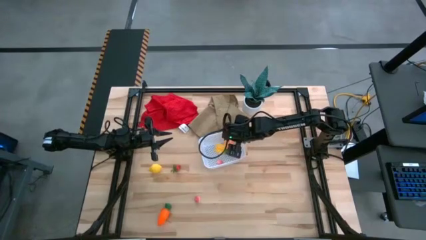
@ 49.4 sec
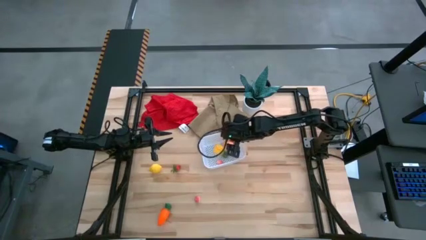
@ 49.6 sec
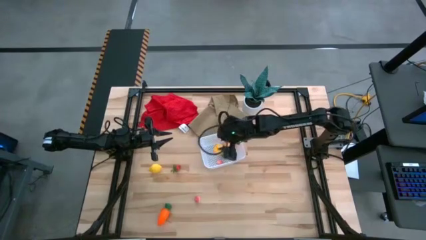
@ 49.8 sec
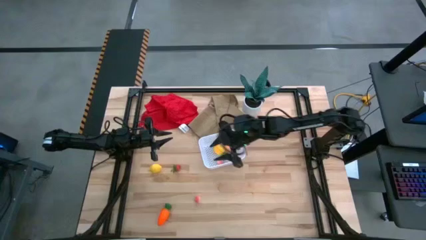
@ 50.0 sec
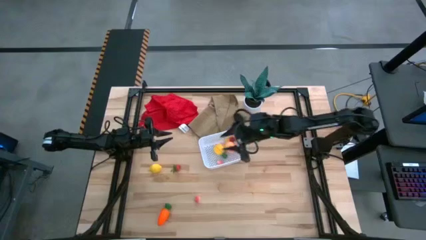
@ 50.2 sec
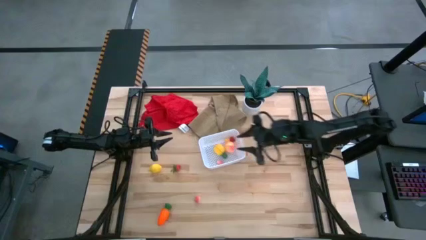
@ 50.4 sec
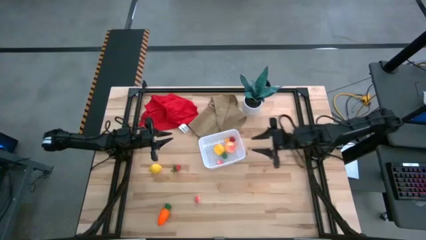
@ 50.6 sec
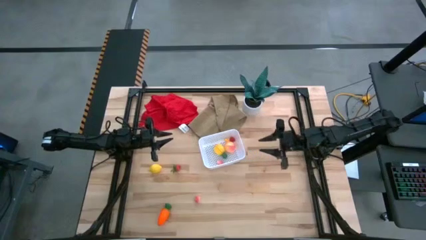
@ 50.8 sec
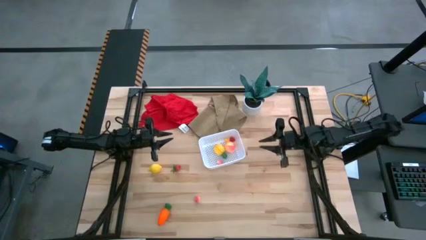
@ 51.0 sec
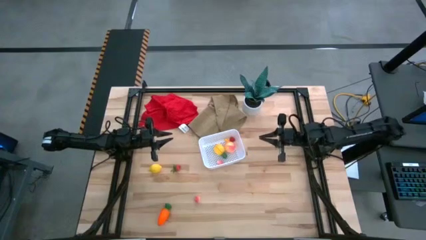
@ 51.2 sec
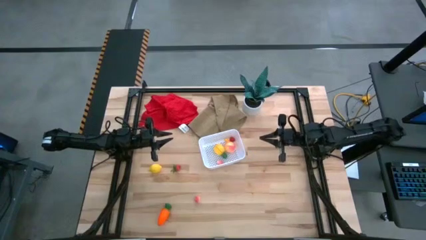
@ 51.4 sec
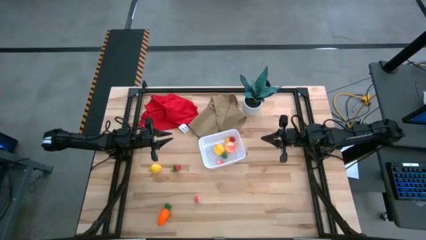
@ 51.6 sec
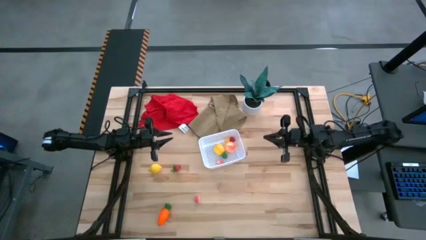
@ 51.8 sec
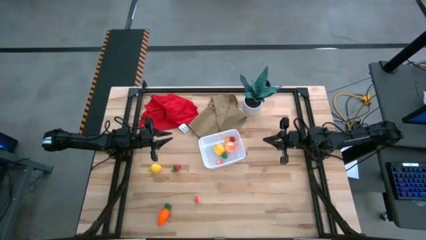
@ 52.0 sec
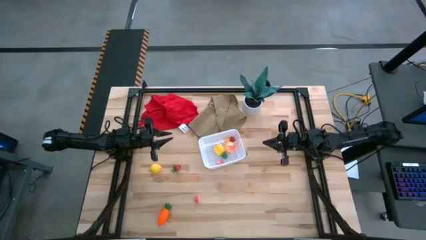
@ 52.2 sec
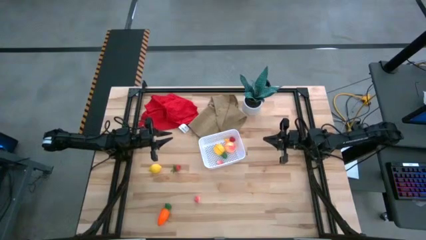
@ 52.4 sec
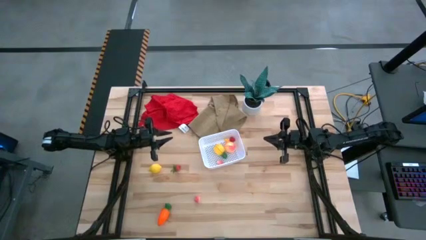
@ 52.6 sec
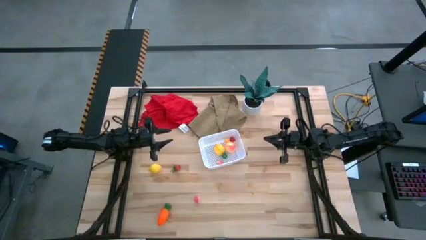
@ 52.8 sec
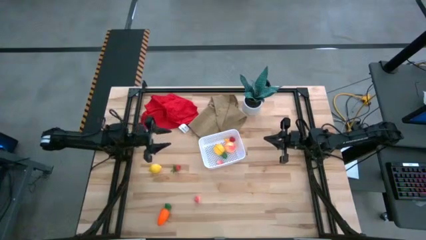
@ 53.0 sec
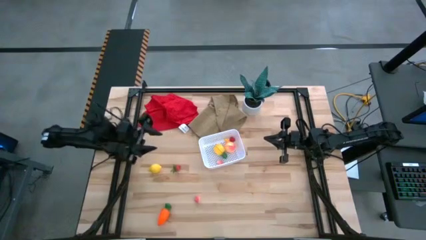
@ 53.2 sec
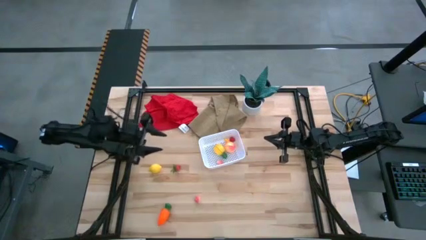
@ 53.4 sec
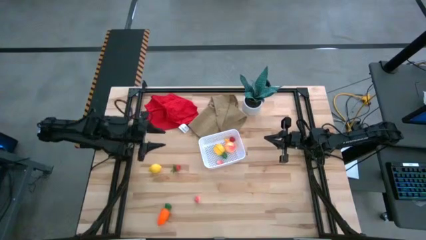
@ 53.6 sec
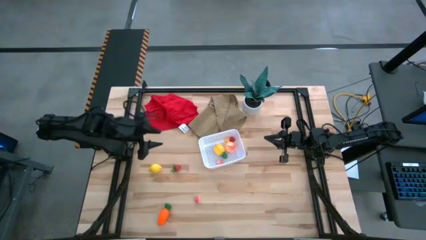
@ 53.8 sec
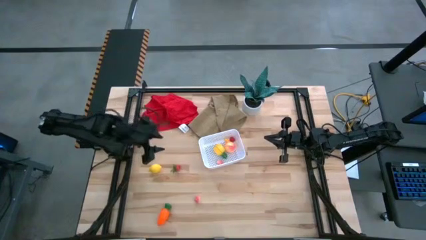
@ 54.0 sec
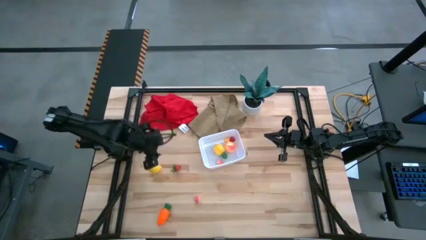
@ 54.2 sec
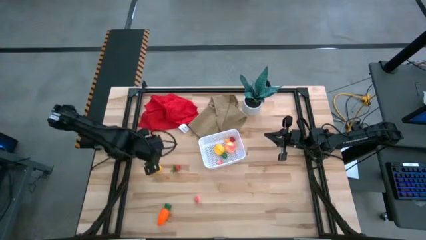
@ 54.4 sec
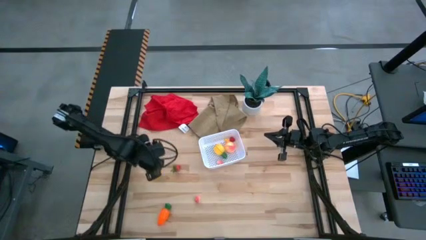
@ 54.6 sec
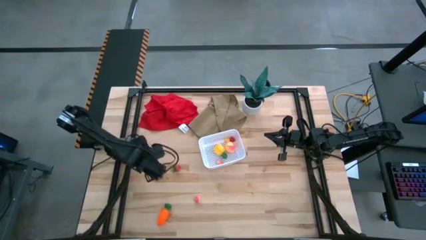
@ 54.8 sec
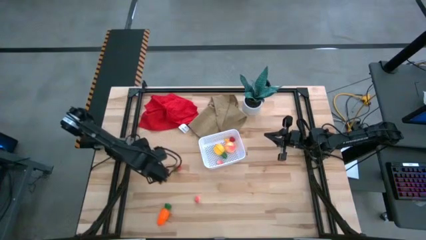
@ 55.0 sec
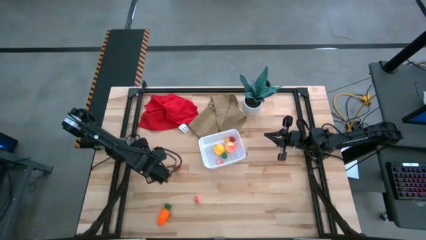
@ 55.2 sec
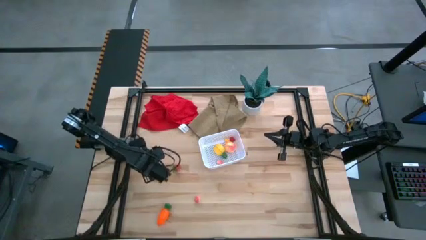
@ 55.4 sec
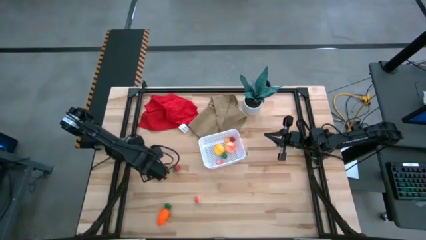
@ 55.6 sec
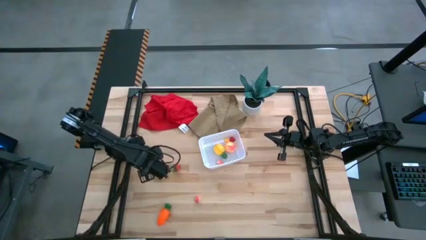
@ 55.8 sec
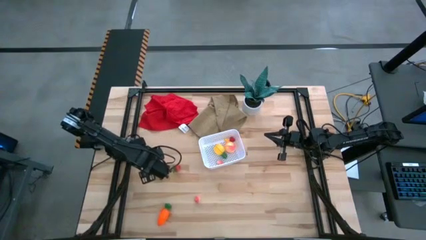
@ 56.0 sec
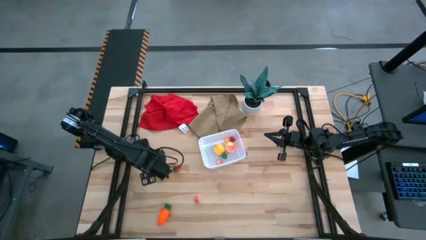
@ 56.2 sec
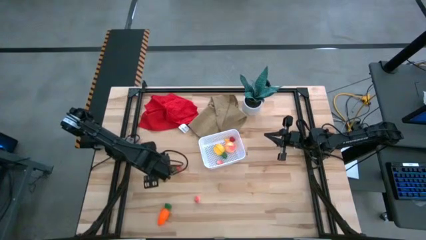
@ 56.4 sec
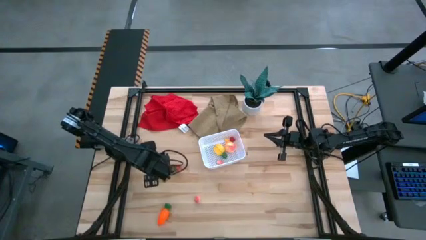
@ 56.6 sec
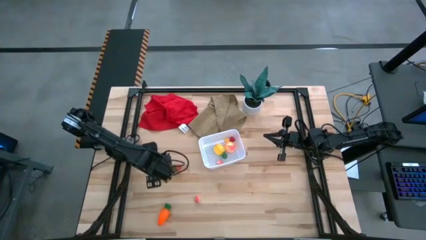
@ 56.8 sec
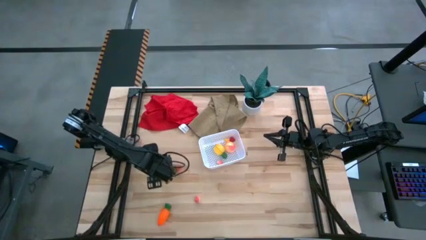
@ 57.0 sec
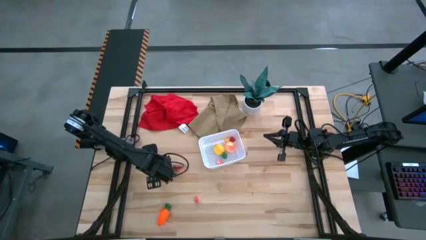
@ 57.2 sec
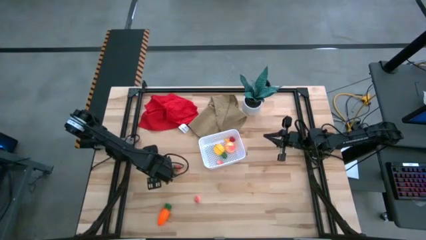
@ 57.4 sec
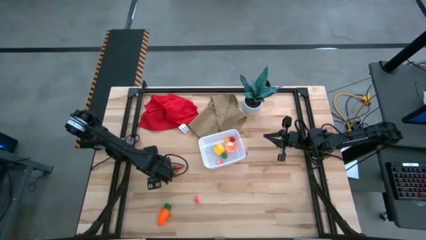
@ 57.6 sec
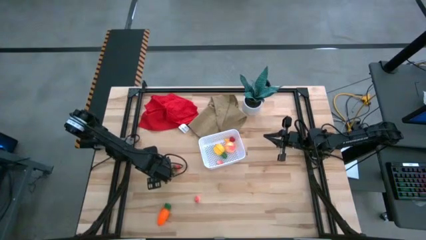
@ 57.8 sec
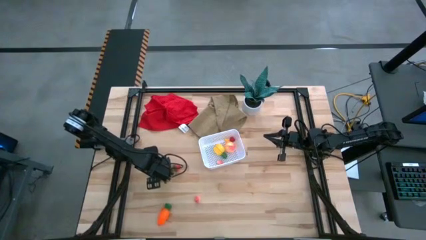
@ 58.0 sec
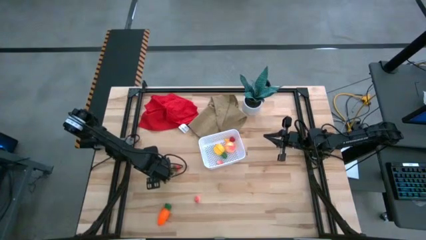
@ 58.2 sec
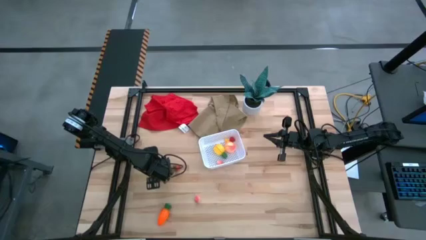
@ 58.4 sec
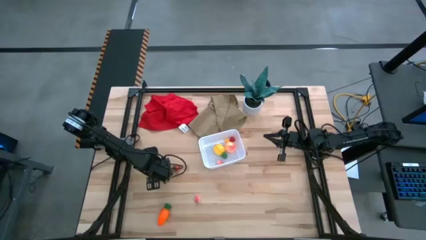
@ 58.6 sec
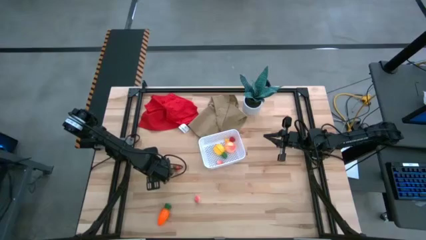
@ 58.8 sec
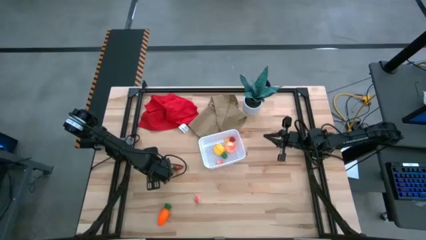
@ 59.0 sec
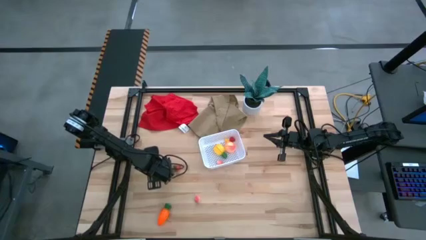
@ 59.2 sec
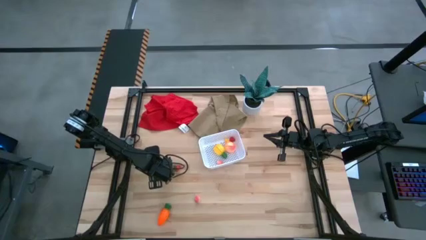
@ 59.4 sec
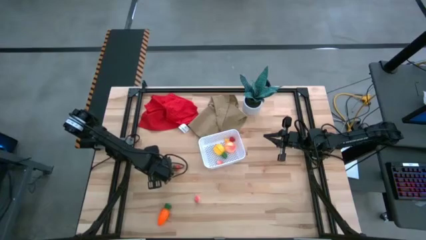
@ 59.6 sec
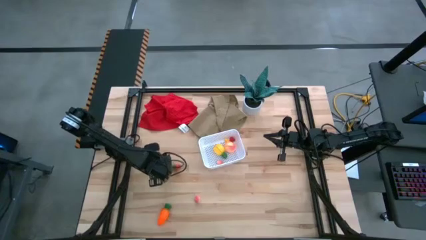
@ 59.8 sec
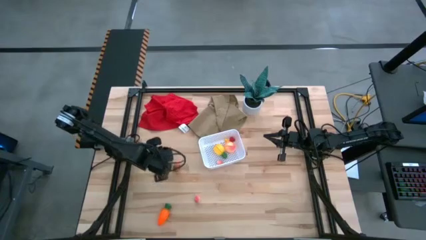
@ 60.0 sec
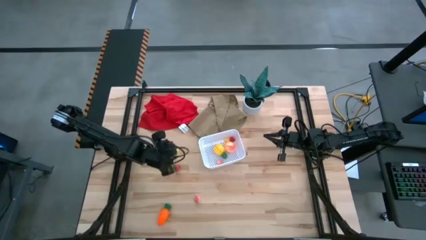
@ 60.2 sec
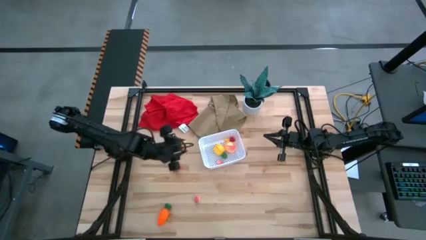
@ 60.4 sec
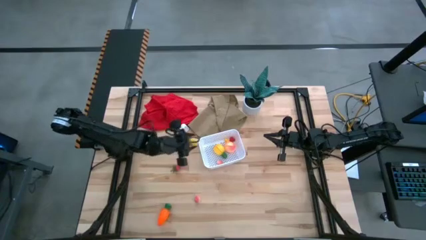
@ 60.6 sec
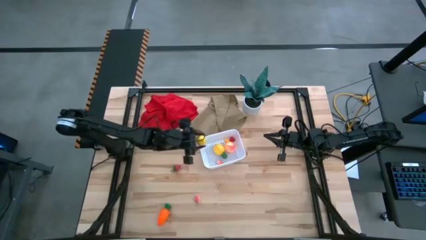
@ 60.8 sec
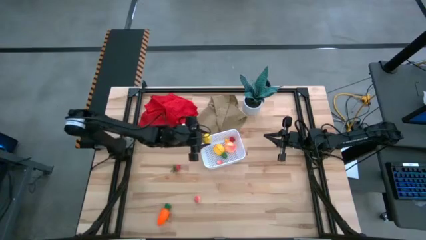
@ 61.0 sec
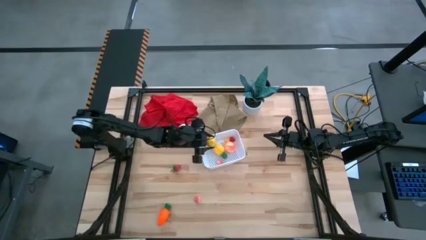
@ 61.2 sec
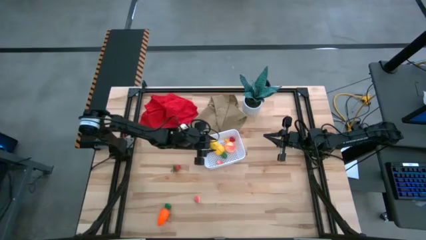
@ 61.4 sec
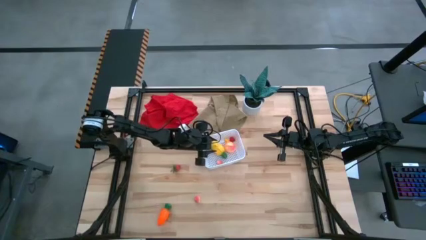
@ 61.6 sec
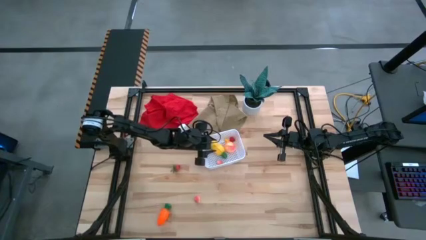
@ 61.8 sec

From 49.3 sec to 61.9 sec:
Task: Pick and placing Produce into tupperware
Put the lemon into the white bin

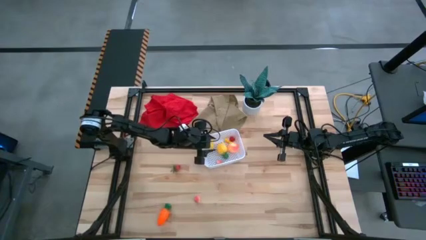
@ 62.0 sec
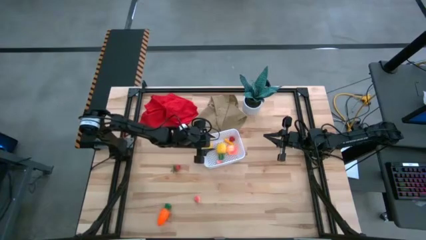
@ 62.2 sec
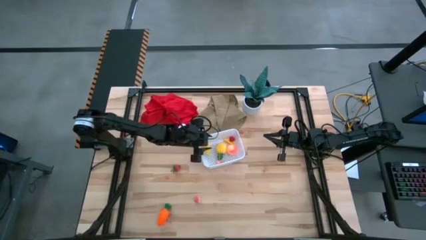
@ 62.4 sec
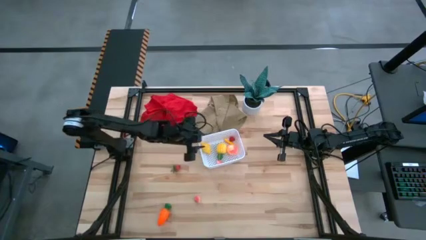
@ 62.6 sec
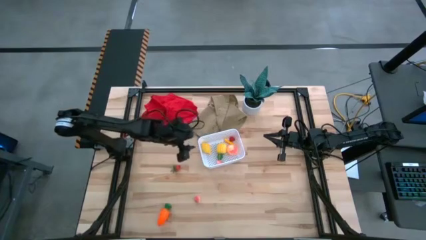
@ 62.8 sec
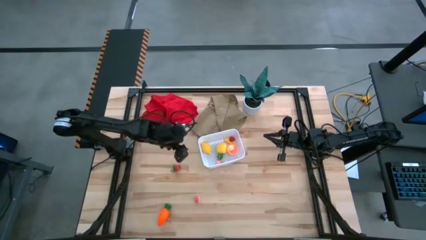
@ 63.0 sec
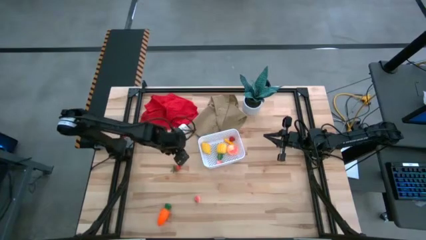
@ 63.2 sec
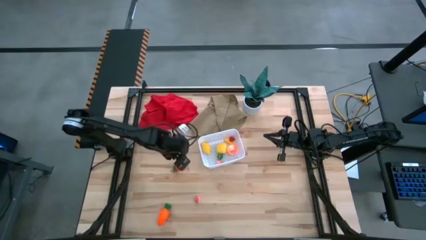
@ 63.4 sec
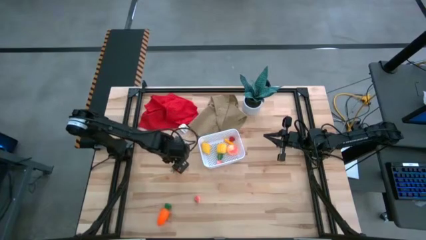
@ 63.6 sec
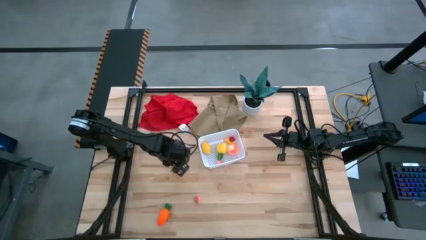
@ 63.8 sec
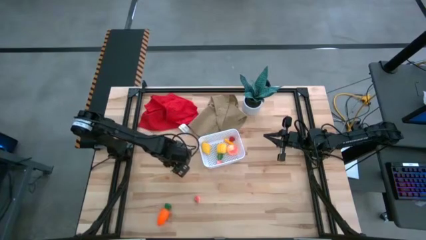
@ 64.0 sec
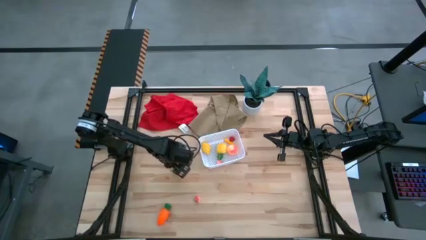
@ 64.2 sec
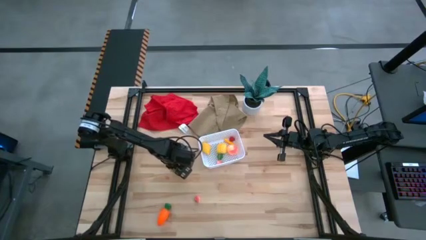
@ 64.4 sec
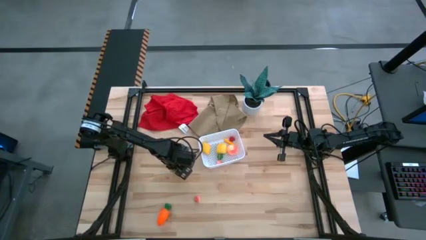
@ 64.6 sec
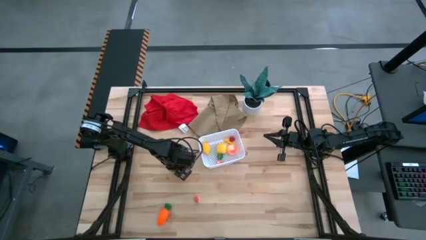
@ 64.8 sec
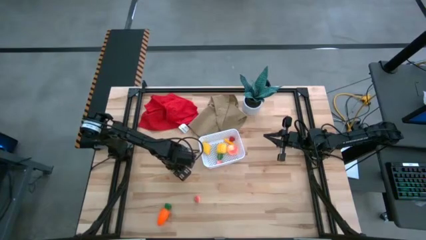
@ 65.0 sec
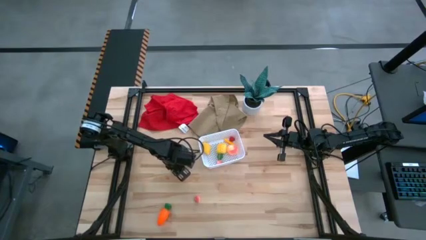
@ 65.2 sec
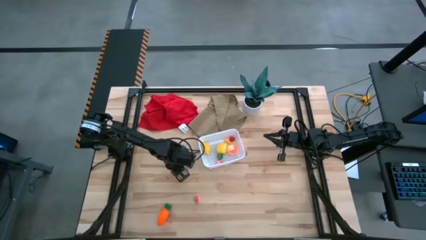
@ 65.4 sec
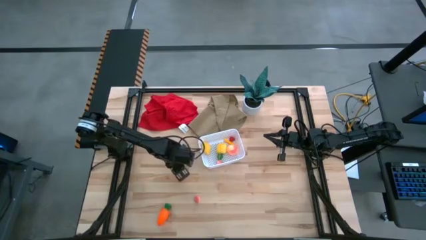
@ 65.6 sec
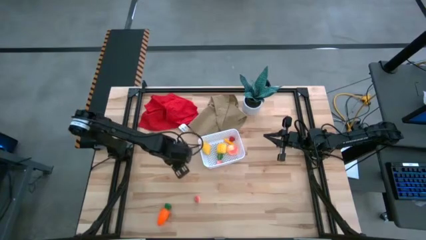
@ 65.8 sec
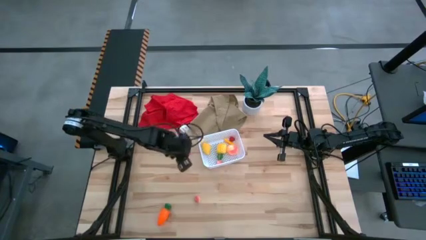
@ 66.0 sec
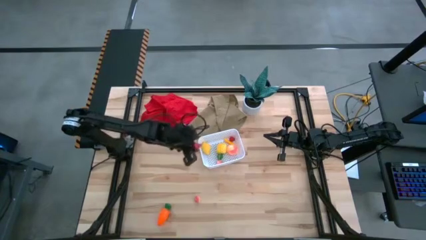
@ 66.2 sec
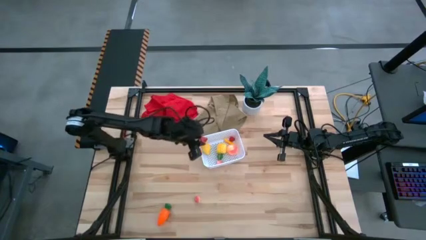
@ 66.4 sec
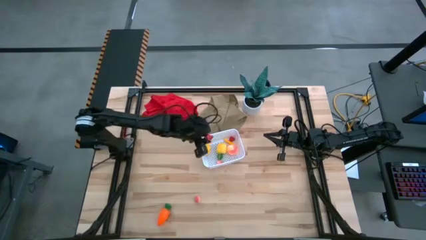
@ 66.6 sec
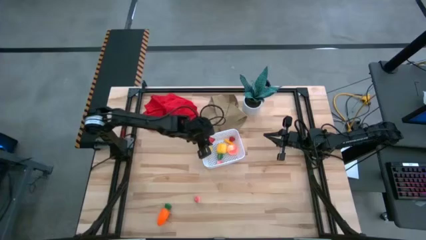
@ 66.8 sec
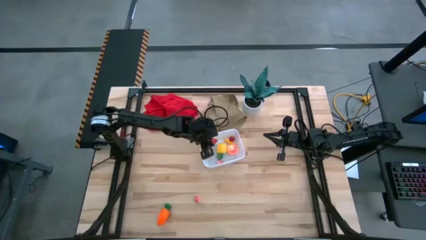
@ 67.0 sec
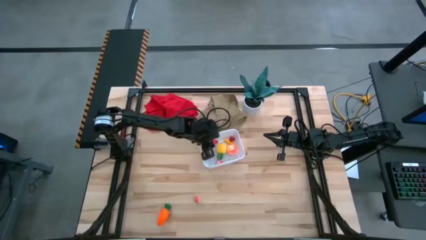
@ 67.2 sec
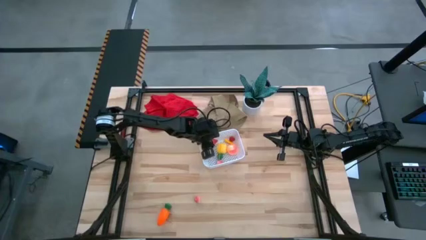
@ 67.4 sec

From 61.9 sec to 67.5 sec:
Put the strawberry into the white bin
